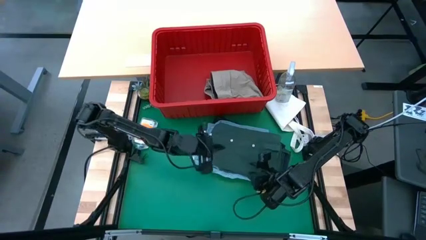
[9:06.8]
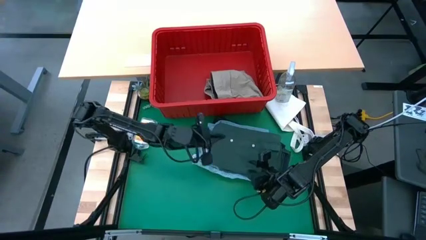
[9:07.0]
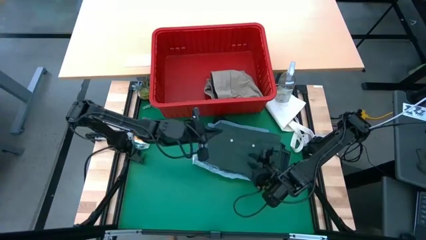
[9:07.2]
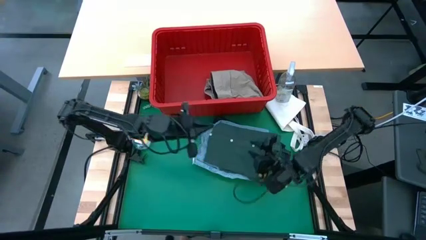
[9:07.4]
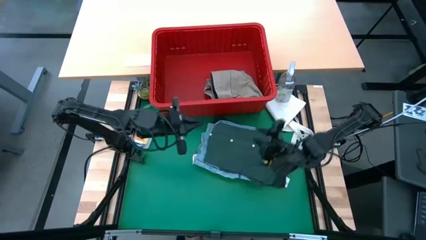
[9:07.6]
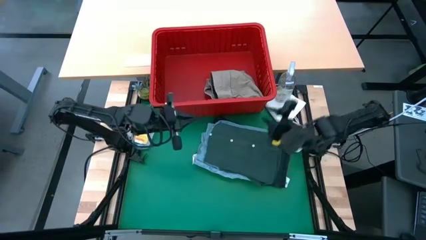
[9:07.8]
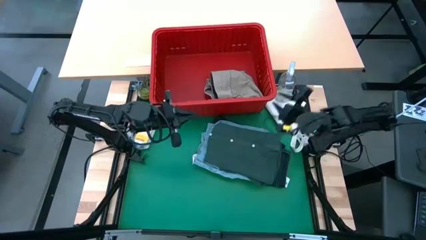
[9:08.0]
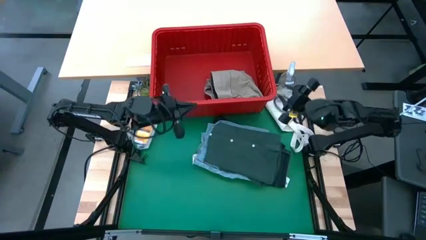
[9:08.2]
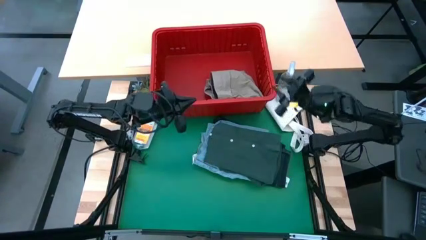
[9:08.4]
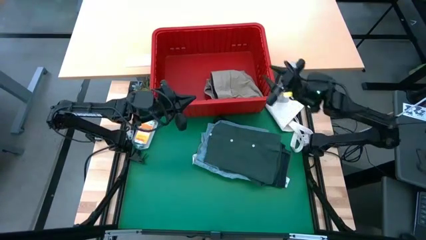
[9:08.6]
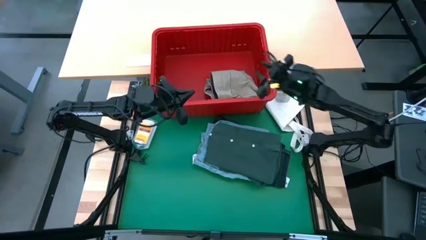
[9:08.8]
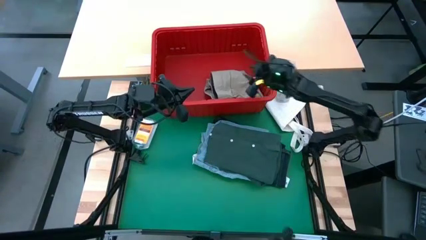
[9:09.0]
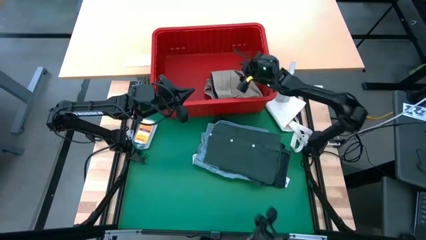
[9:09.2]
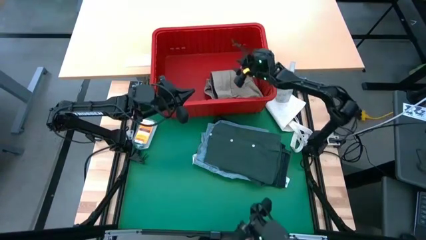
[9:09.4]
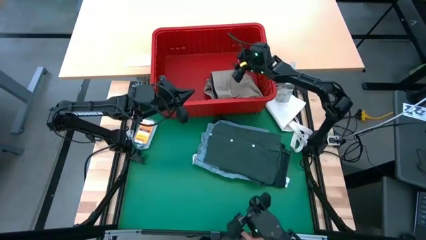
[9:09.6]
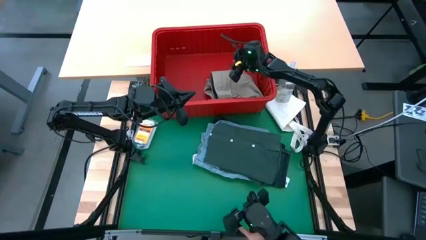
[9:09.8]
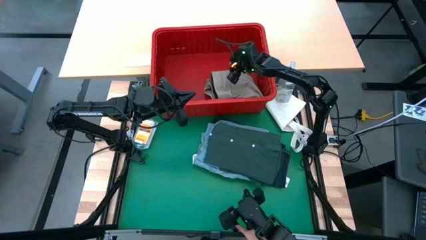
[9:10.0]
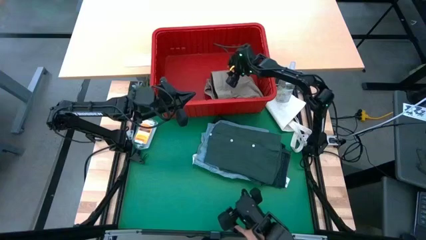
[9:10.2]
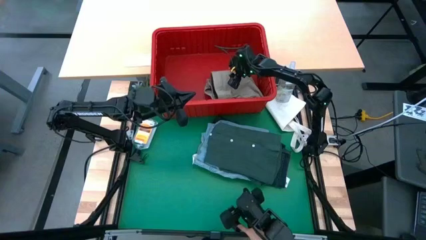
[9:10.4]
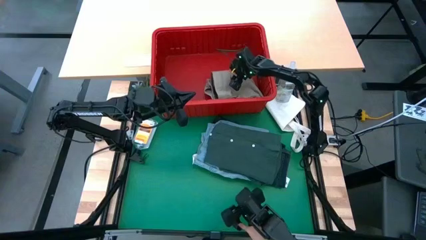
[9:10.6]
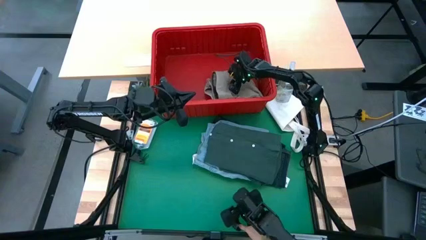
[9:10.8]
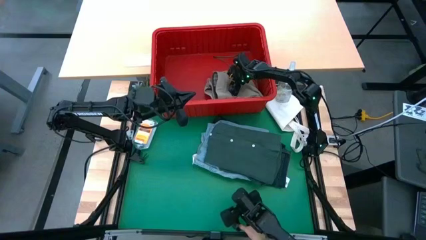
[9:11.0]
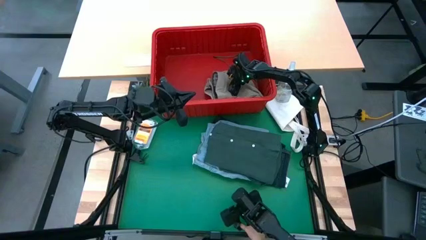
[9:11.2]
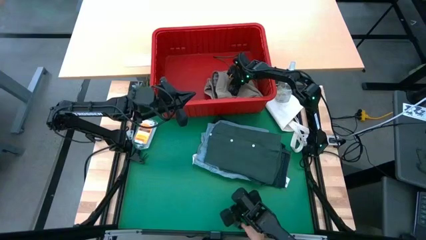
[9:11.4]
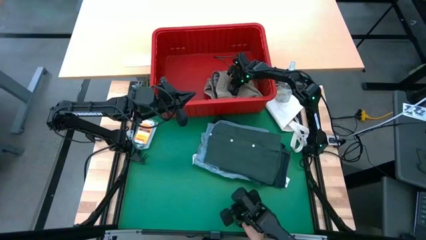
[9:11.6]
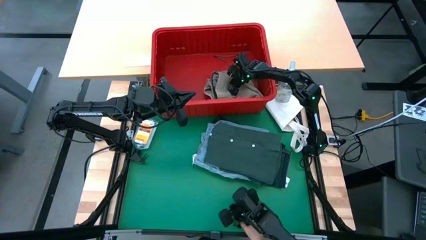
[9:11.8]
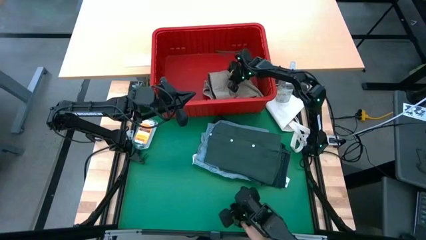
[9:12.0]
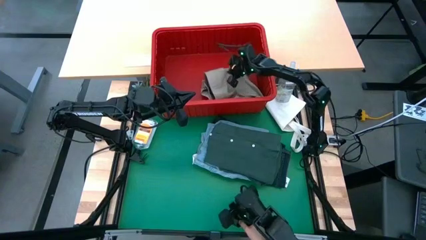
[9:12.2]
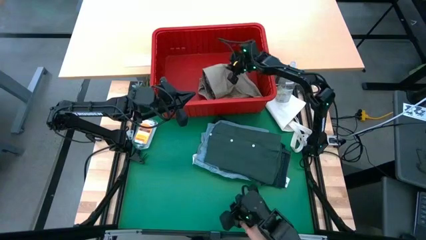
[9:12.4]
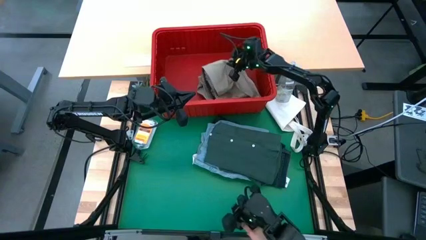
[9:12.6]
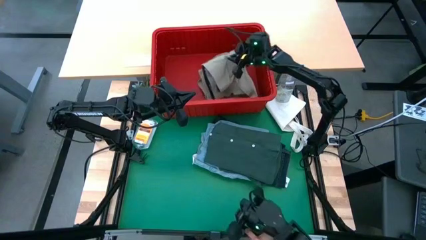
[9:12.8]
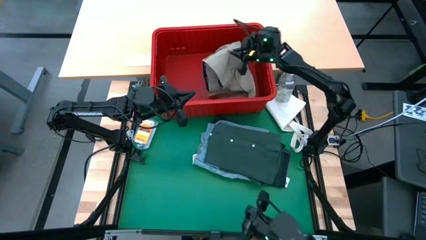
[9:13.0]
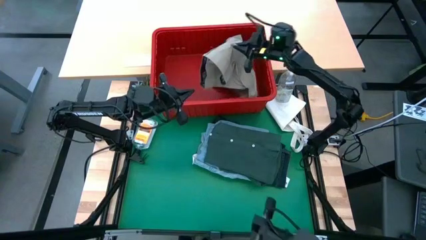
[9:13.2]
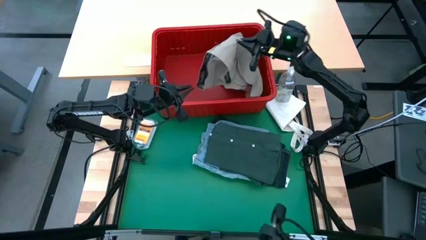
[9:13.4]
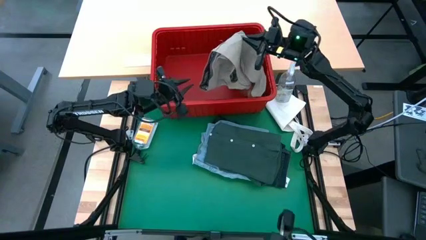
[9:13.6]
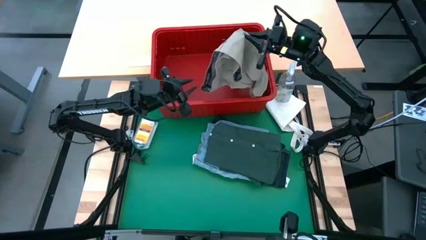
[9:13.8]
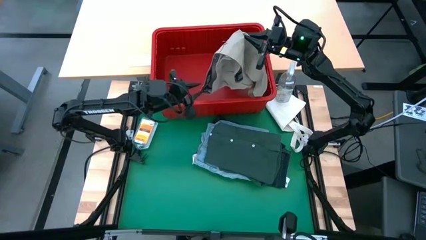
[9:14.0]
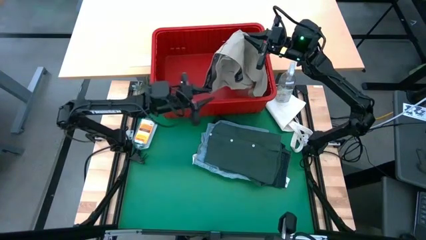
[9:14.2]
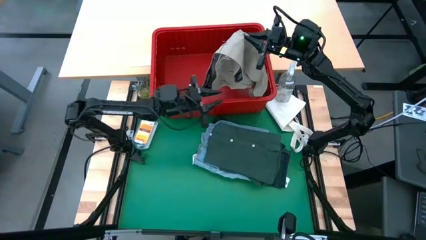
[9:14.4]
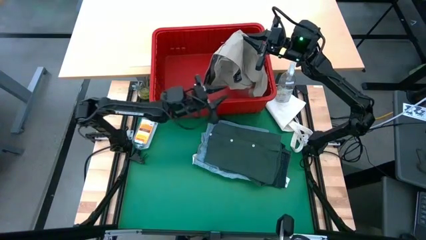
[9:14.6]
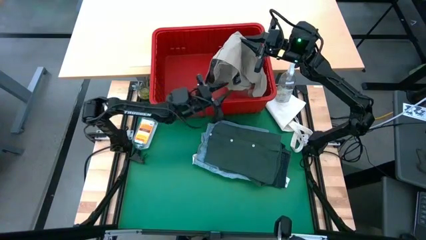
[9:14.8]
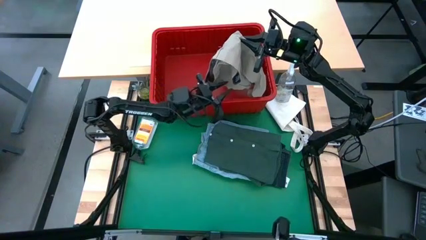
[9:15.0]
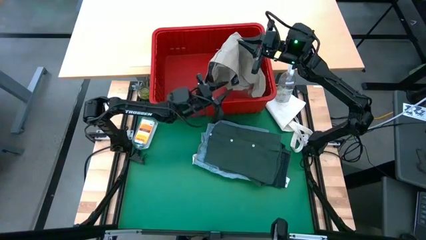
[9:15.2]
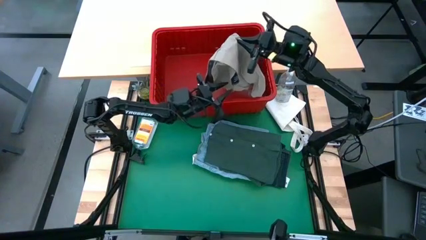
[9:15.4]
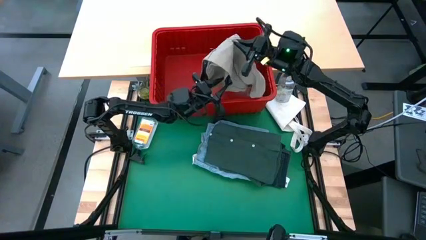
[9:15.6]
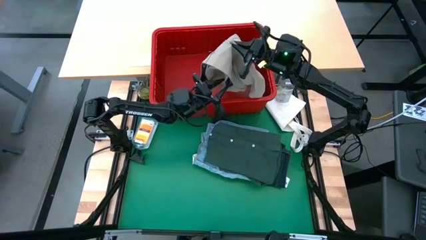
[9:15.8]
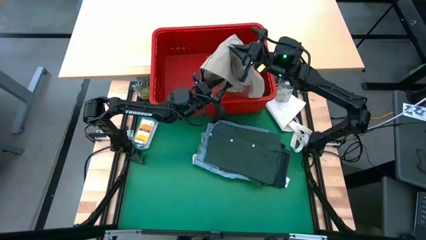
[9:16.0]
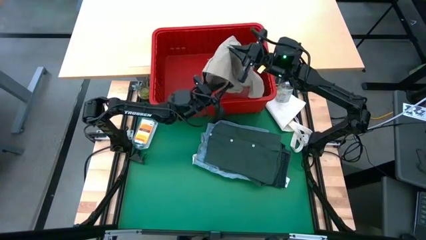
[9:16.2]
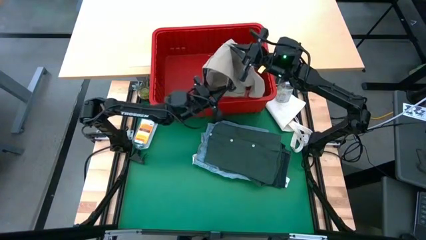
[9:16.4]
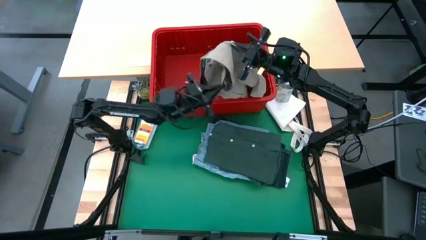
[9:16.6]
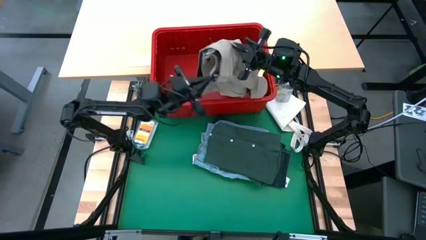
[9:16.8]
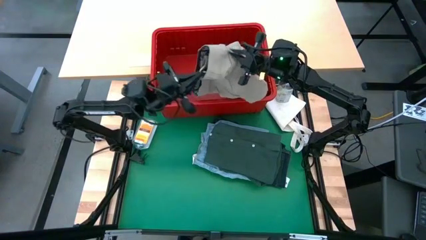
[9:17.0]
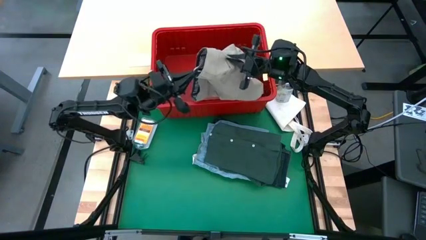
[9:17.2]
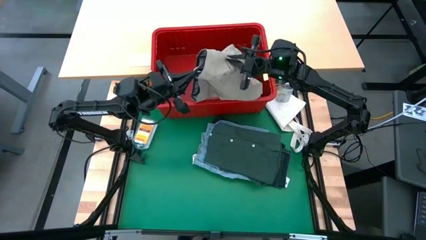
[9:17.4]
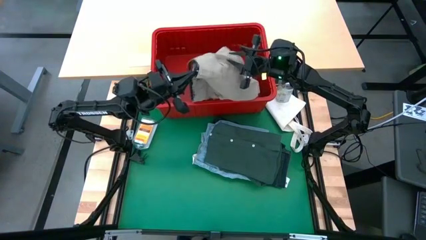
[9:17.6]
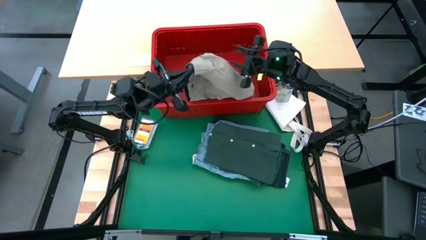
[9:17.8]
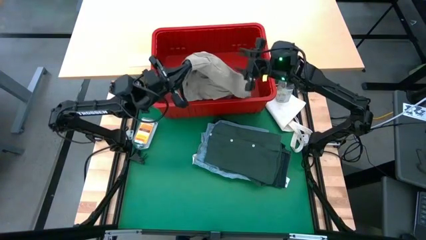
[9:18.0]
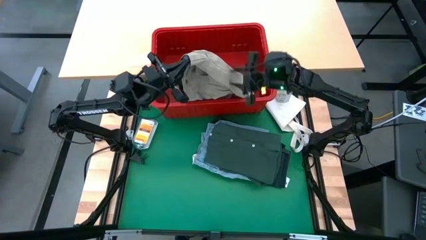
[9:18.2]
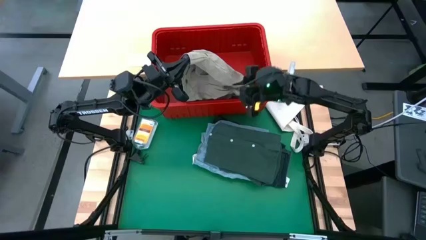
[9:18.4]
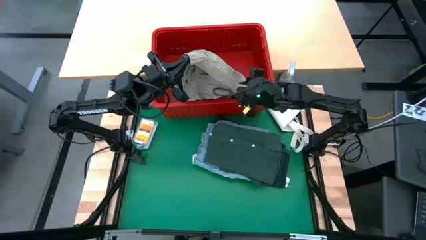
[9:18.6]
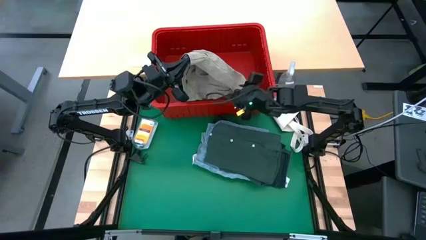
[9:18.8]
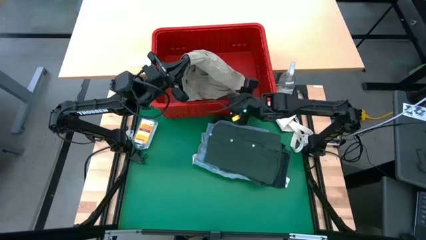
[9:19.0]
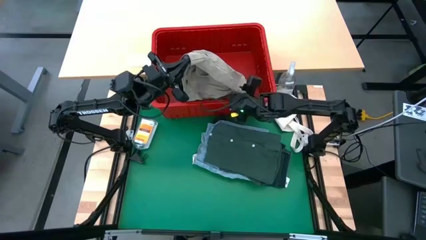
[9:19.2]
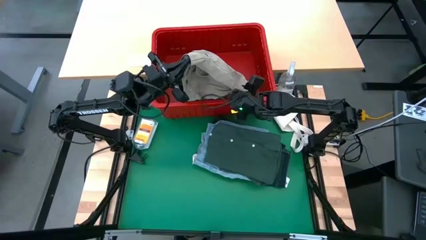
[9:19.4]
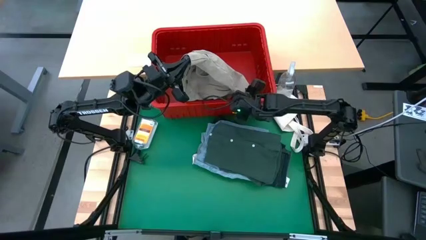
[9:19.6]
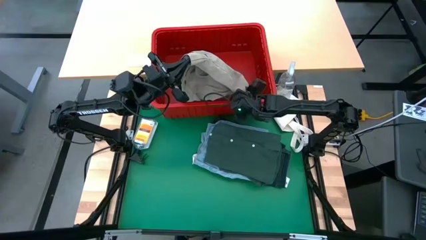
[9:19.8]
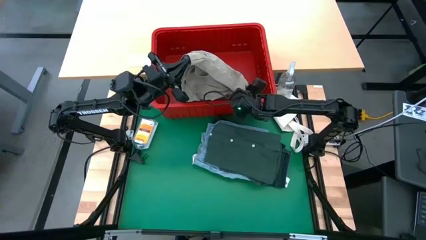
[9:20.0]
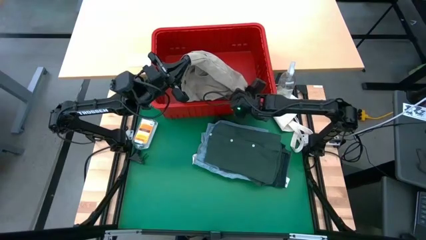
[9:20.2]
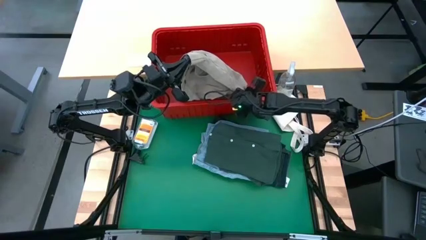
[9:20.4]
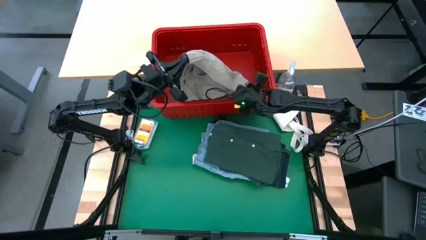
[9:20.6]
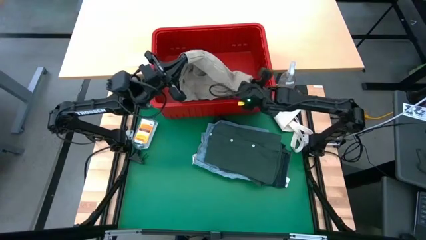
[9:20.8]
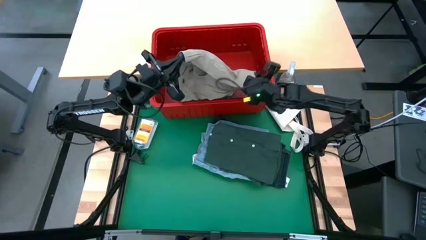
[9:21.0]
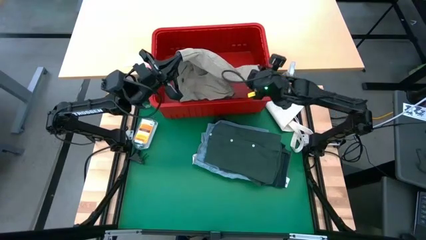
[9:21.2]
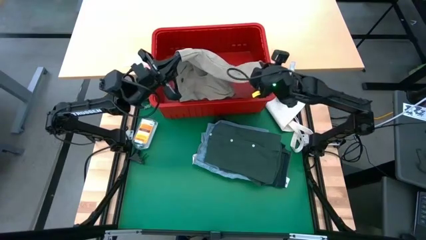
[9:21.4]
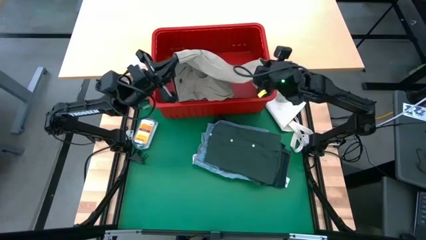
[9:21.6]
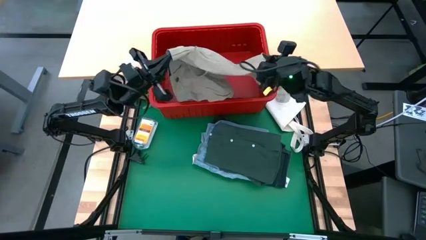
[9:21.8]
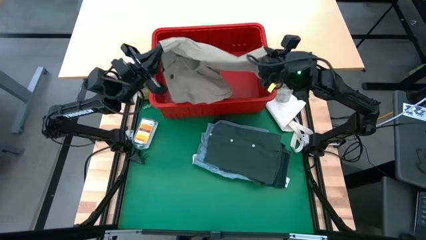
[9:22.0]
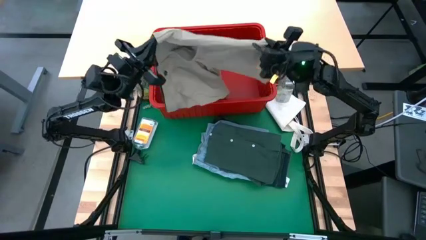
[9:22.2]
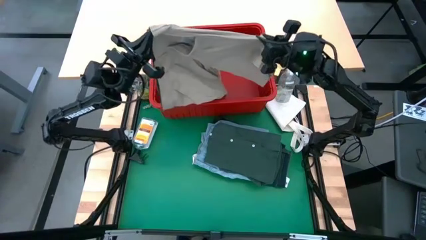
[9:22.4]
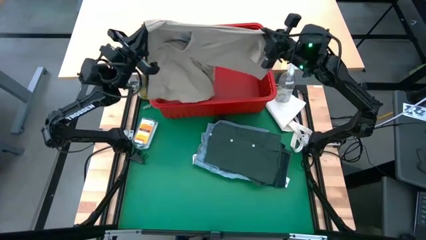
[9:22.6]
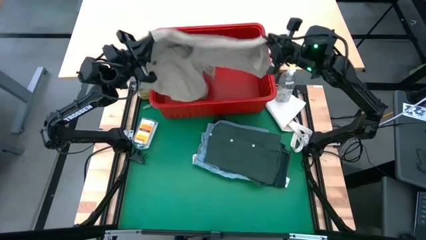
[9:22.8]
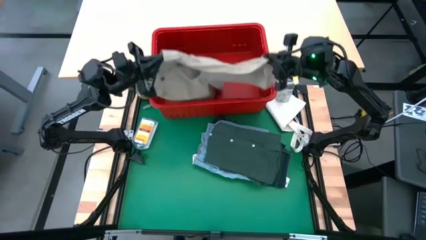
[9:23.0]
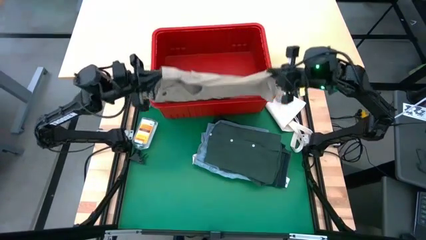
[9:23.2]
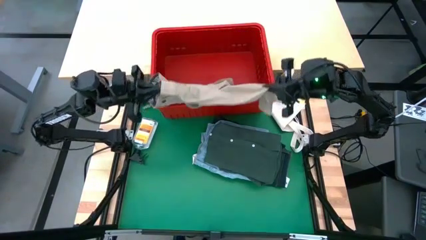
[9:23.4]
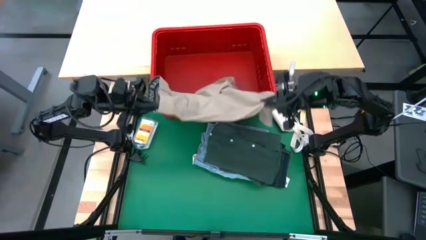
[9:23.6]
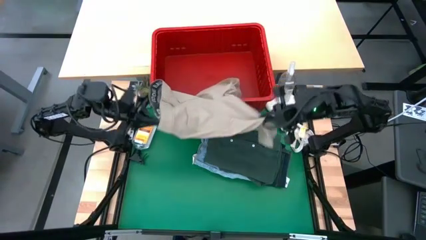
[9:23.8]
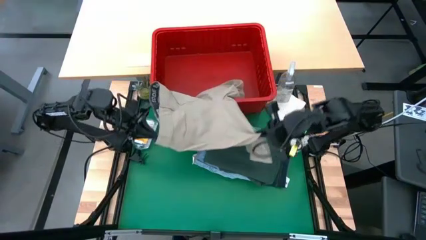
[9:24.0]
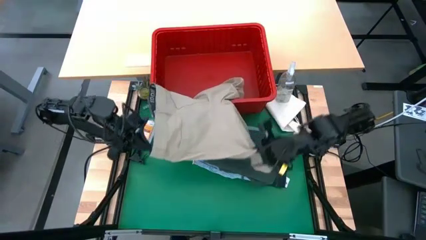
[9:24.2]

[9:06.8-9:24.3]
Task: Fold laundry
Fold the beige shorts
